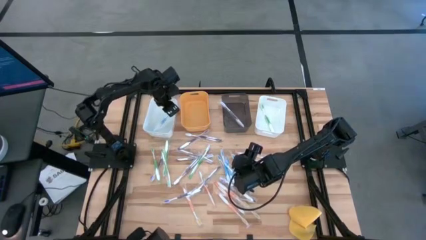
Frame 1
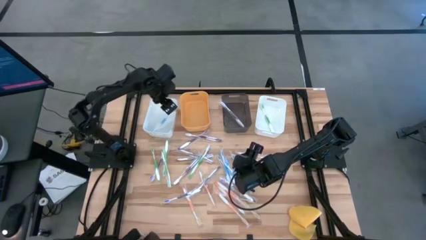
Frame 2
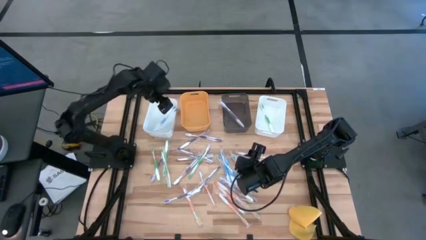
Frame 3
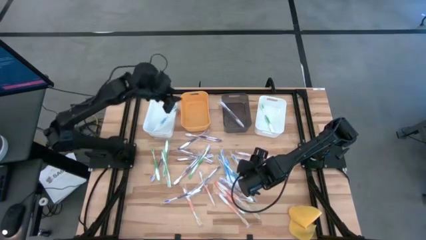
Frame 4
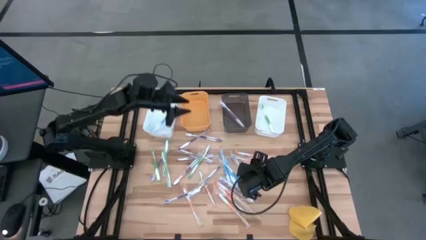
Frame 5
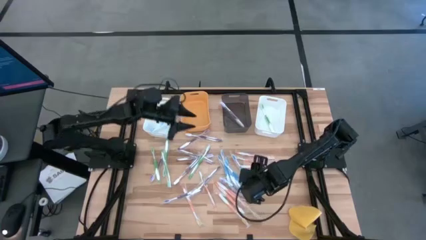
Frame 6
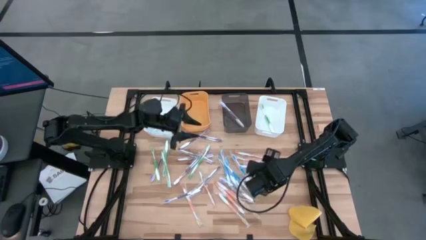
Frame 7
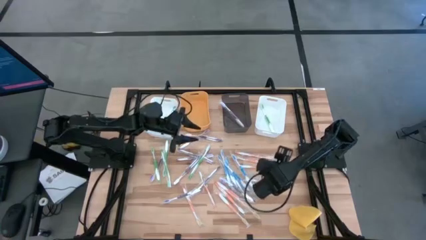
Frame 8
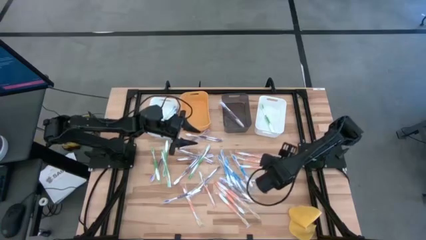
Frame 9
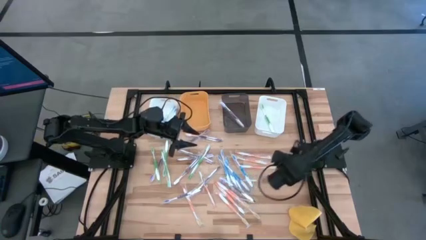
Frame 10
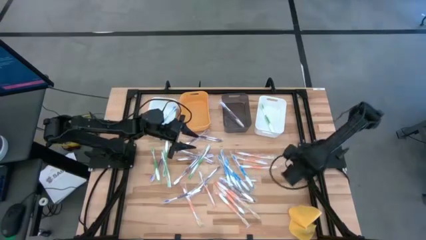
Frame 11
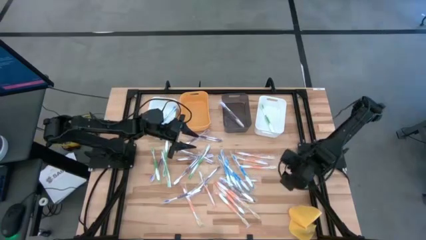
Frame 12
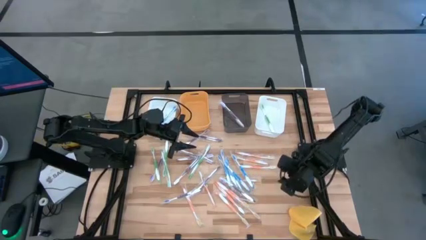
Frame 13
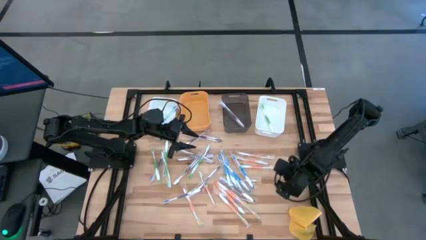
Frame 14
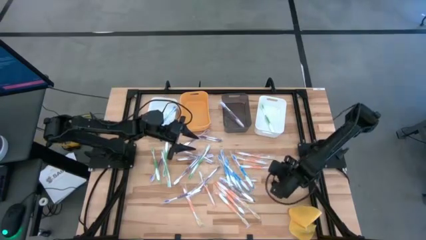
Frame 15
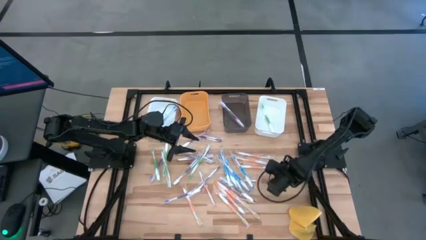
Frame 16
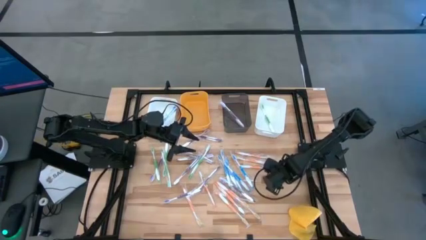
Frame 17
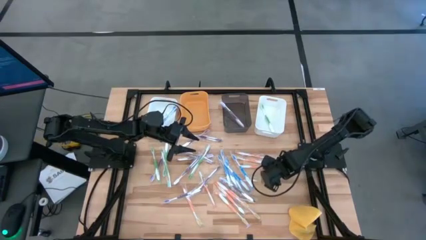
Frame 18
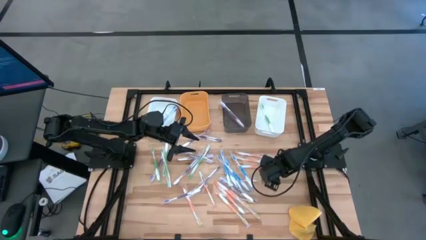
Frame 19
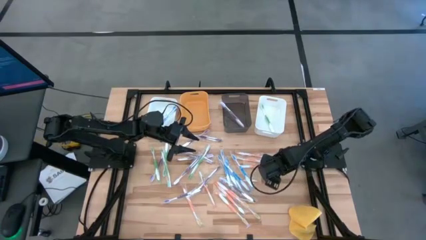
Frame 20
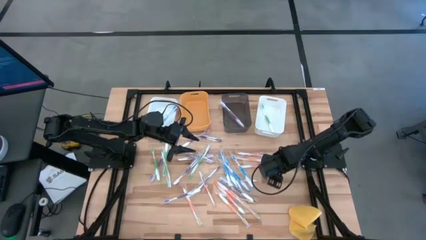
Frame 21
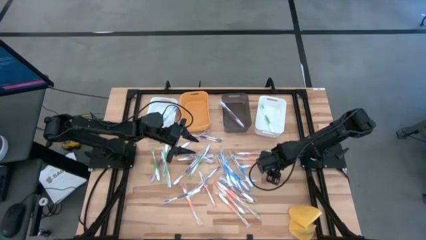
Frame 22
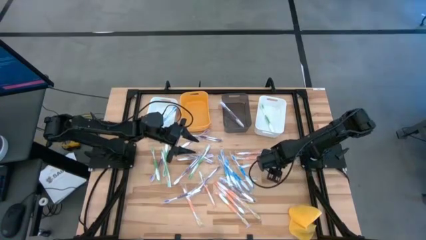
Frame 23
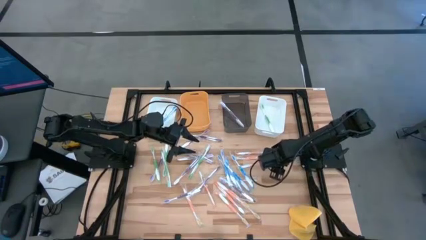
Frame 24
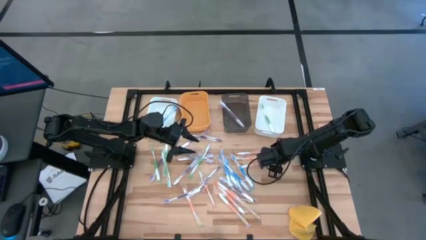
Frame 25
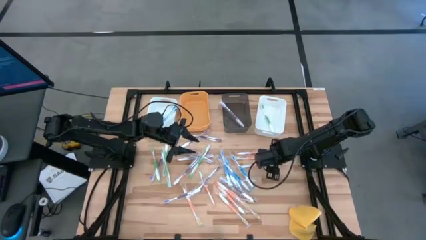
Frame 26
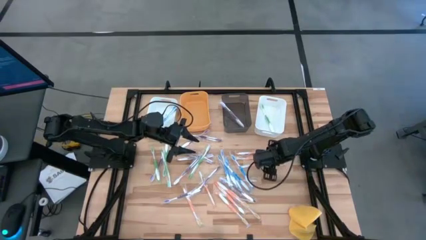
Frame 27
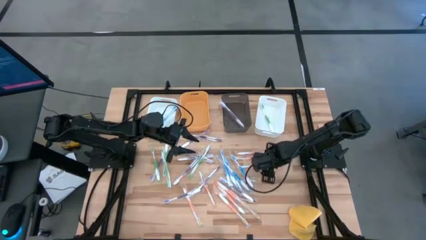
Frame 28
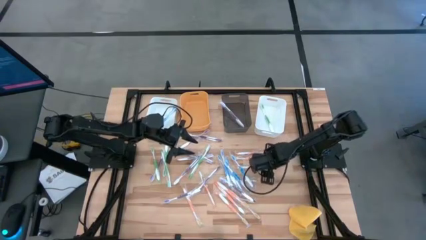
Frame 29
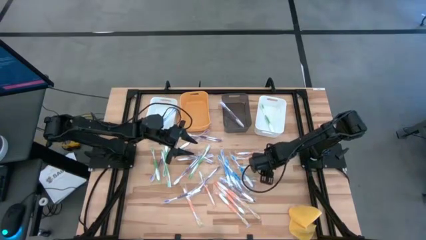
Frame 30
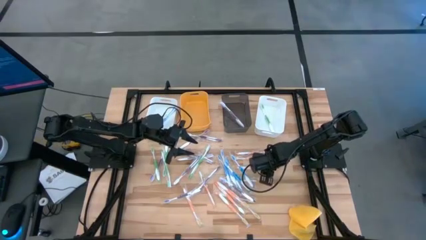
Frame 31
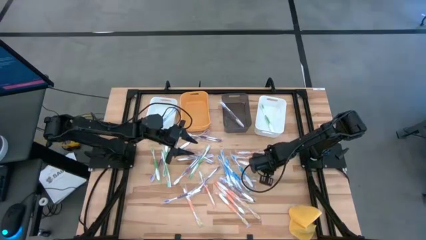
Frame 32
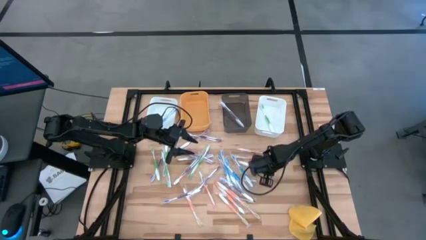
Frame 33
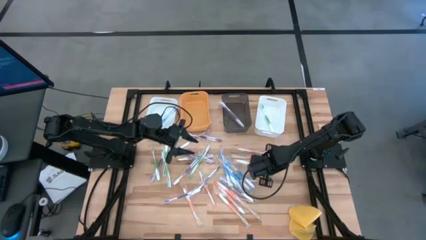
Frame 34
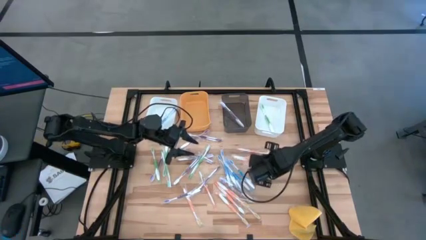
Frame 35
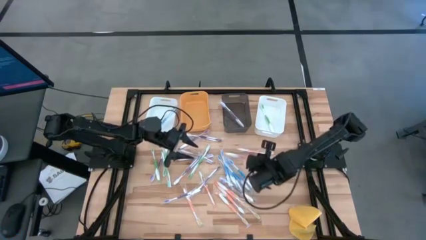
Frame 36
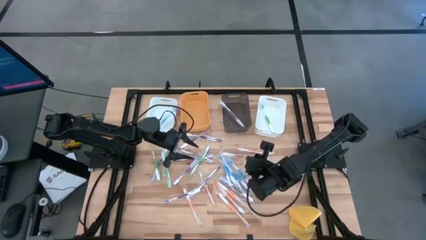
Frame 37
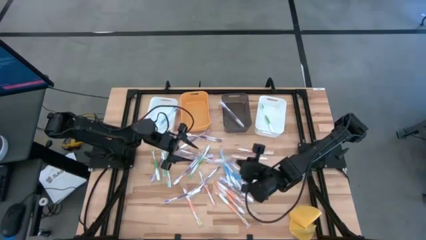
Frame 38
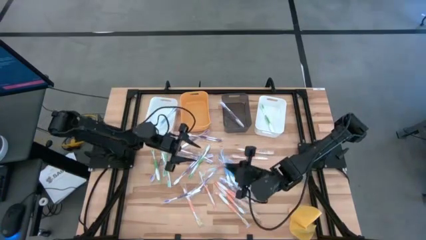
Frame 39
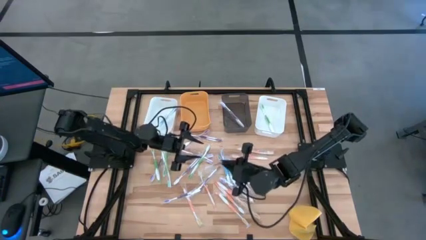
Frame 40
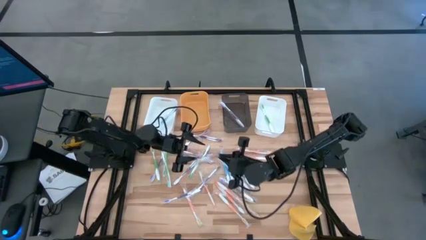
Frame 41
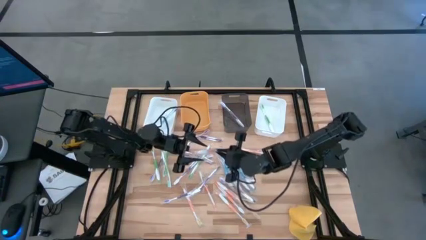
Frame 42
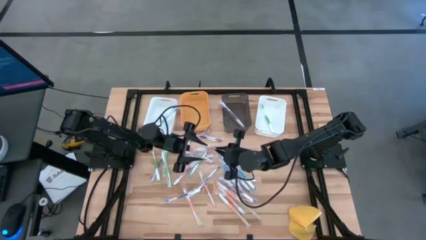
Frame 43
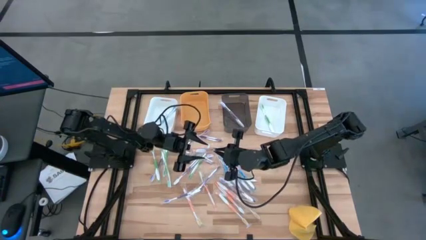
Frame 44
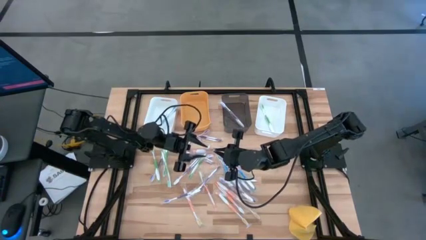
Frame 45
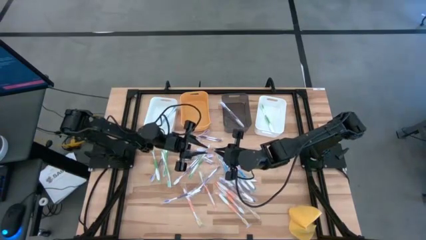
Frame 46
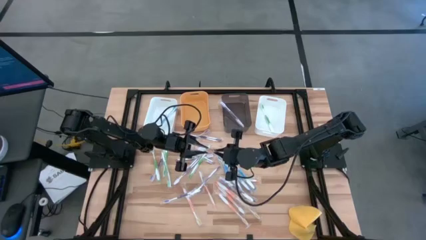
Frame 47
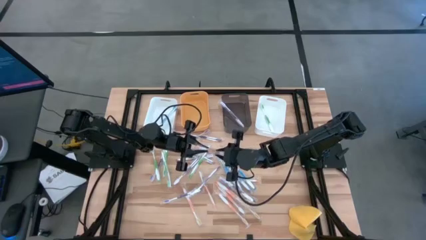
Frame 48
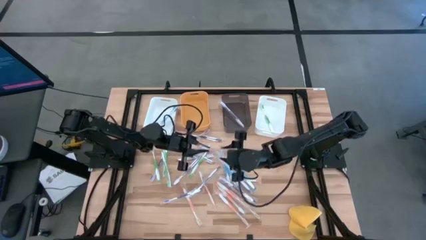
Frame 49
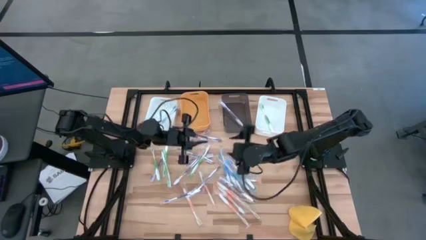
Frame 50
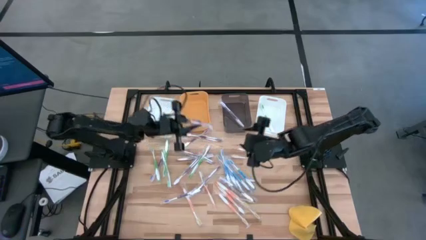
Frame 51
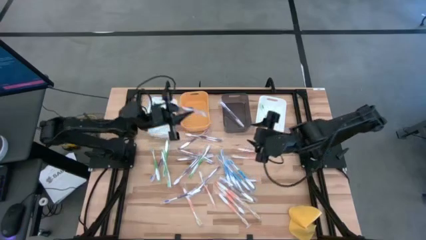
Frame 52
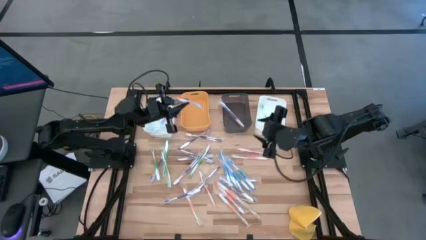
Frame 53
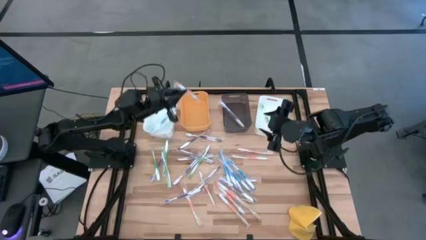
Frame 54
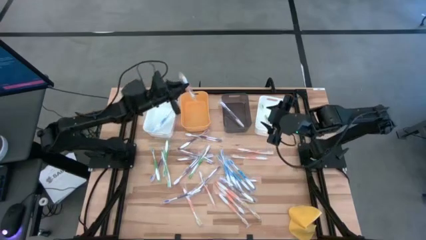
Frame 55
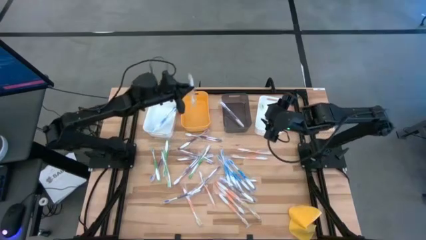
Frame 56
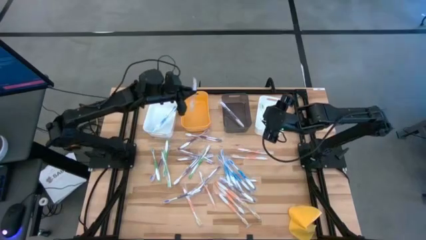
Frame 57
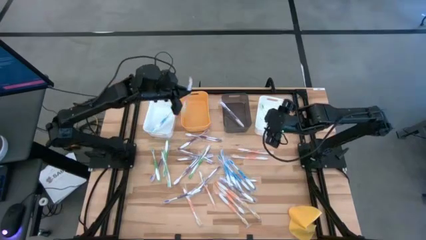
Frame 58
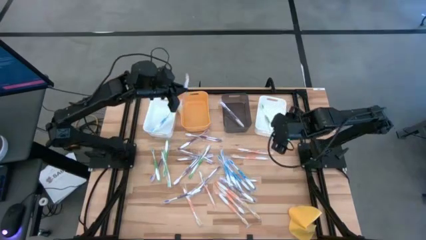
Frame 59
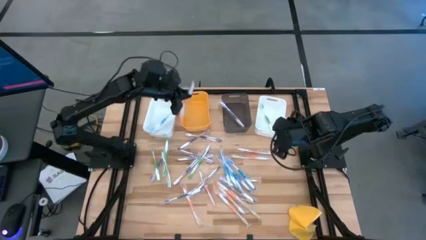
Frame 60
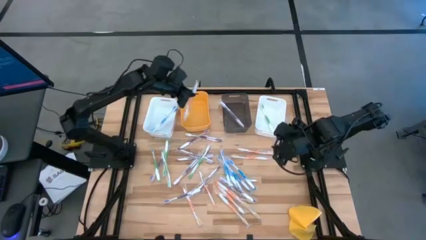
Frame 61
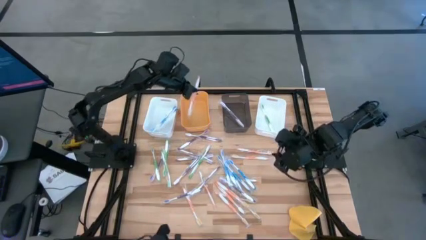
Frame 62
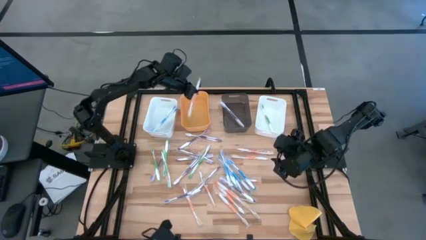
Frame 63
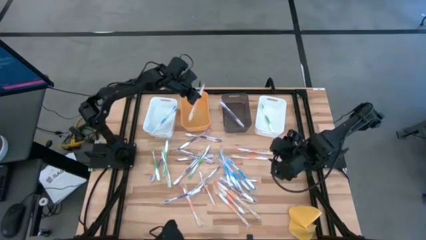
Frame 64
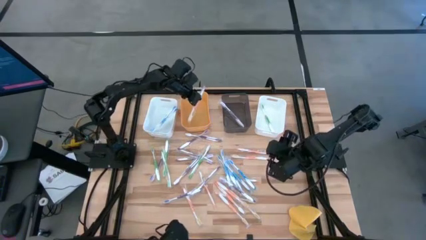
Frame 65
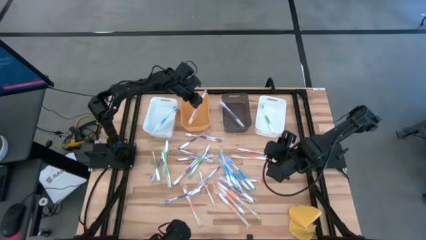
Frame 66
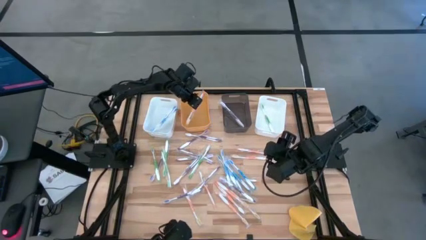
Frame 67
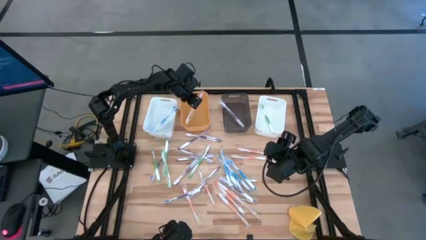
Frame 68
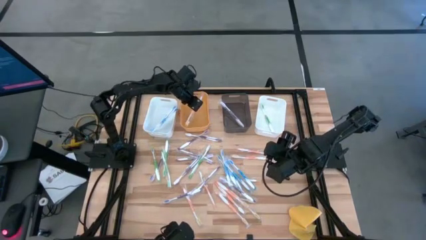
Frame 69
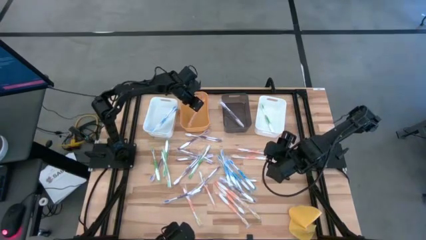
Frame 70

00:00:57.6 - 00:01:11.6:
Task: Pick & Place Toothbrushes
Put the orange toothbrush into the yellow bin

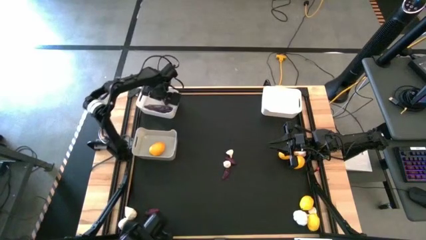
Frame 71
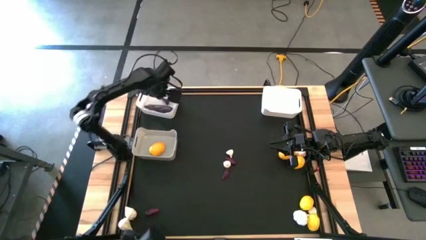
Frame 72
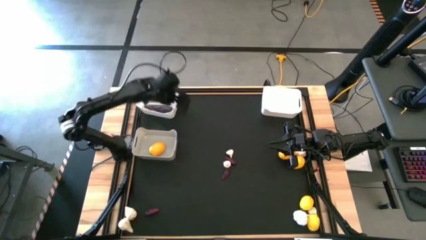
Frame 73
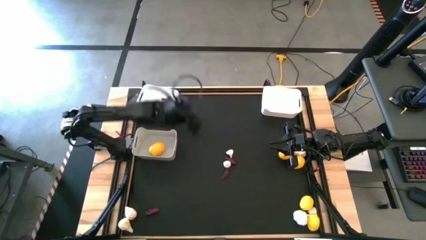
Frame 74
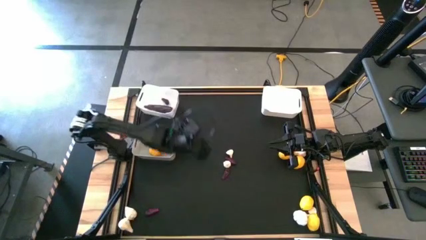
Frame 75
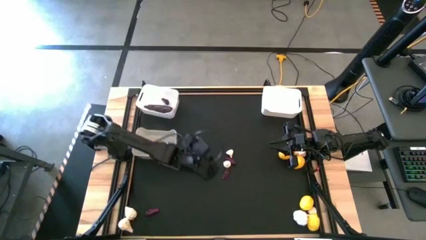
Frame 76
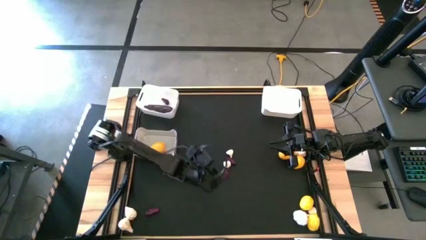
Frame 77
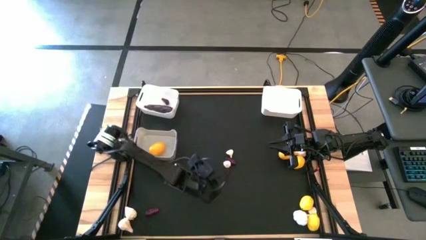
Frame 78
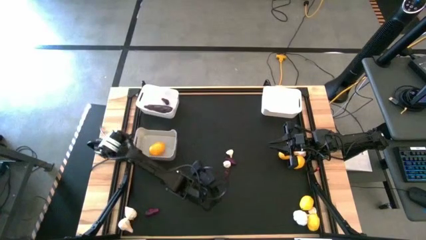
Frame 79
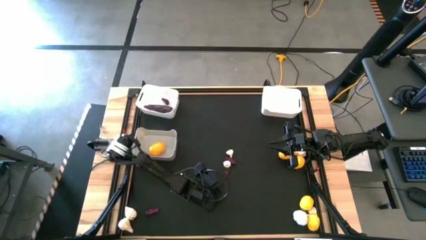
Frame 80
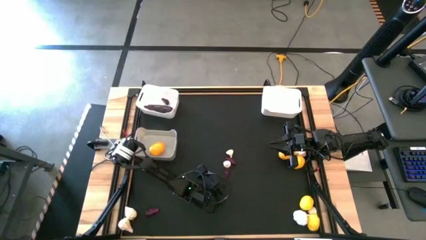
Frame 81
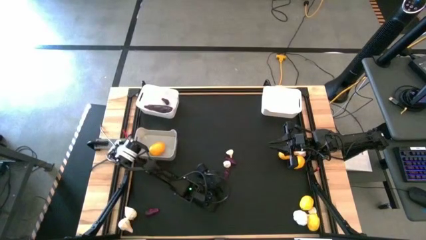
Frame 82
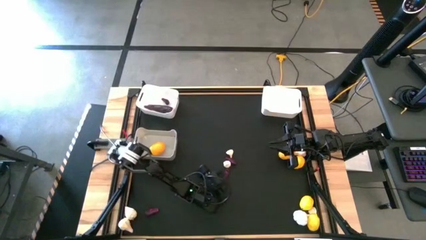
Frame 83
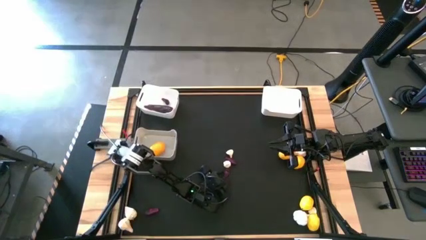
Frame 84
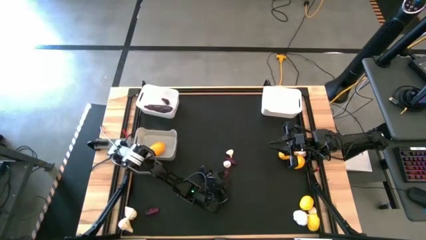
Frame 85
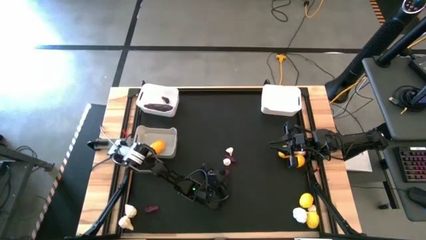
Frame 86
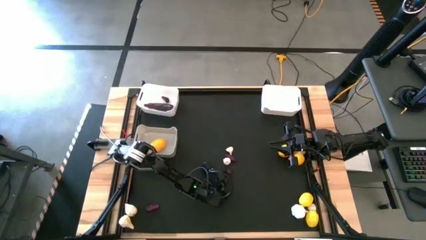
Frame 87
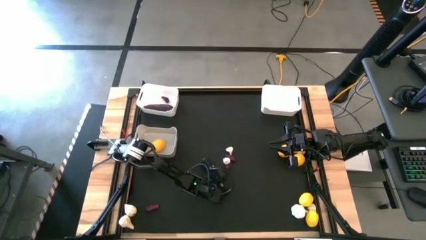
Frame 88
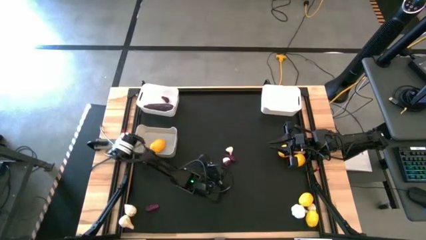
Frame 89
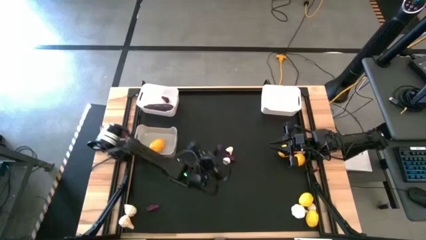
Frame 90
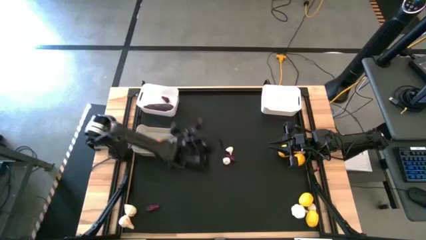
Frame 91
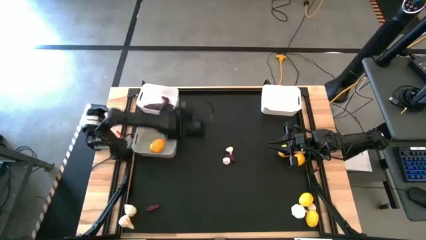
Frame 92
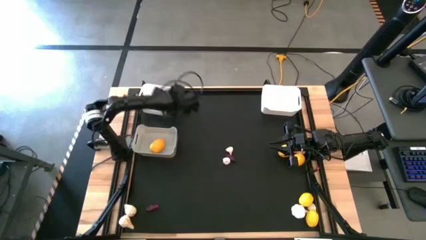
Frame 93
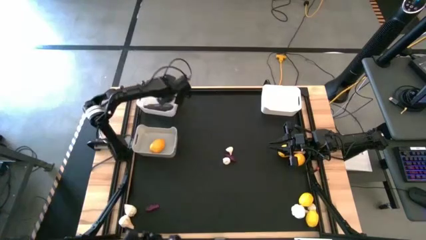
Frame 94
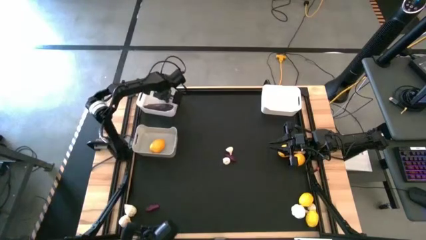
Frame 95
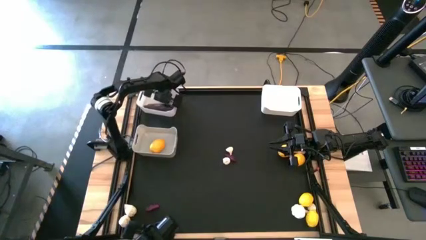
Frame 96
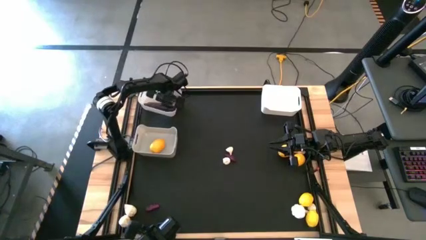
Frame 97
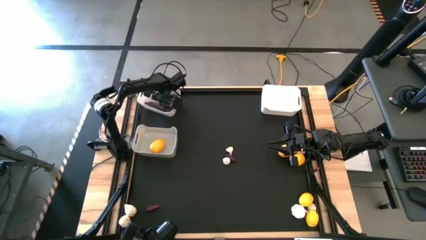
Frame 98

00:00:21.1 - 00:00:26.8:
Task: Sort produce into baskets
Put the eggplant into the left white bin
